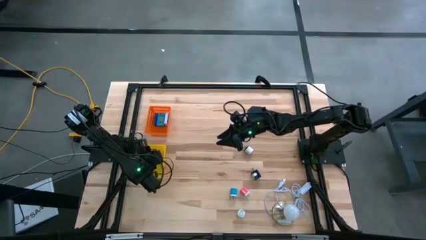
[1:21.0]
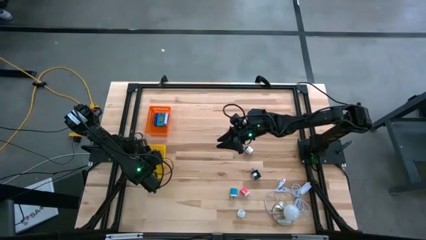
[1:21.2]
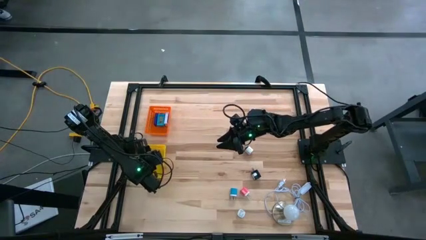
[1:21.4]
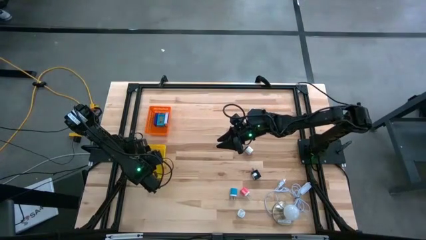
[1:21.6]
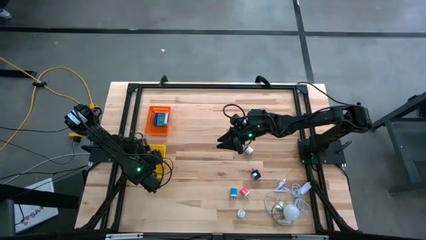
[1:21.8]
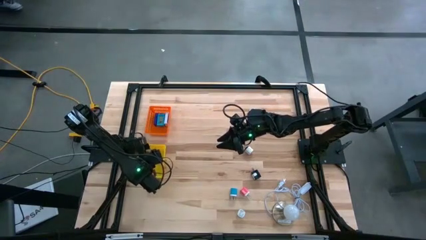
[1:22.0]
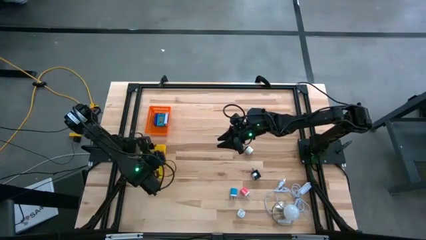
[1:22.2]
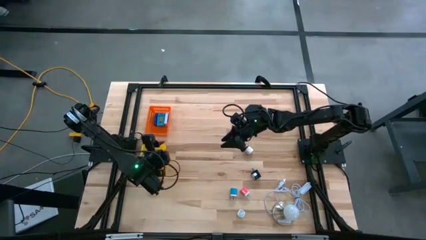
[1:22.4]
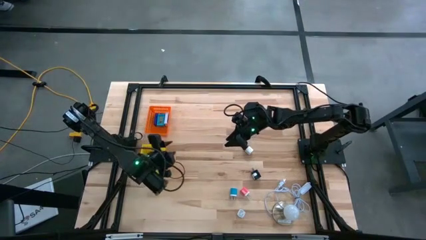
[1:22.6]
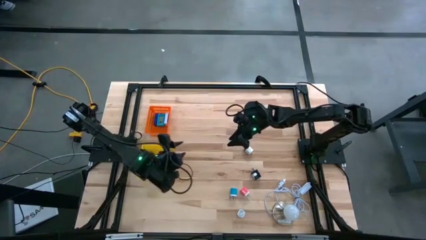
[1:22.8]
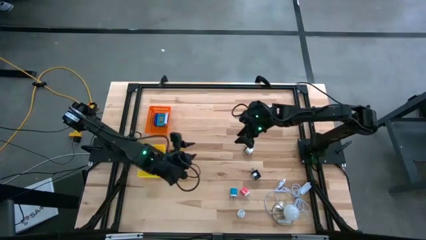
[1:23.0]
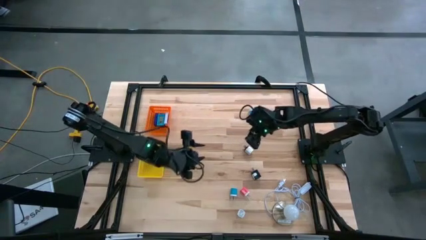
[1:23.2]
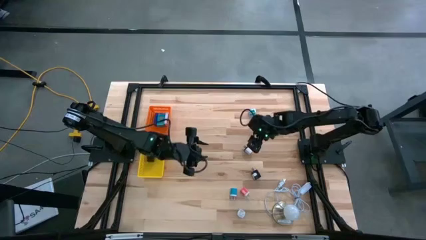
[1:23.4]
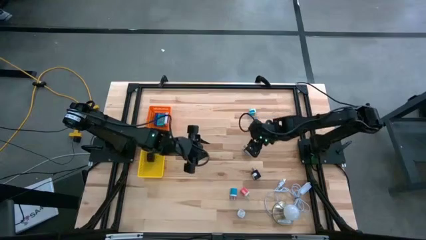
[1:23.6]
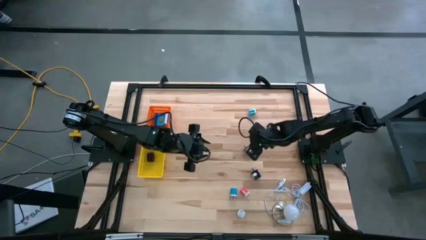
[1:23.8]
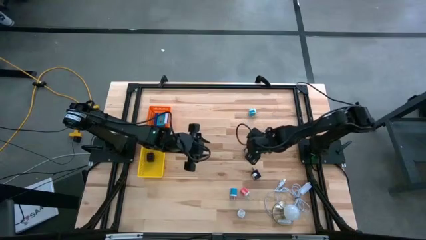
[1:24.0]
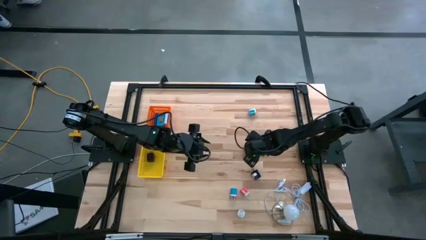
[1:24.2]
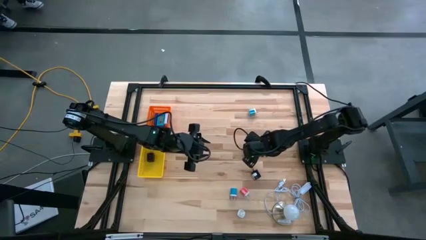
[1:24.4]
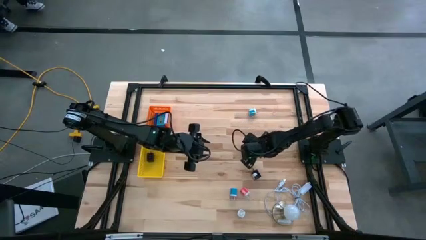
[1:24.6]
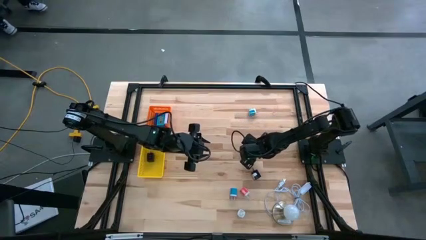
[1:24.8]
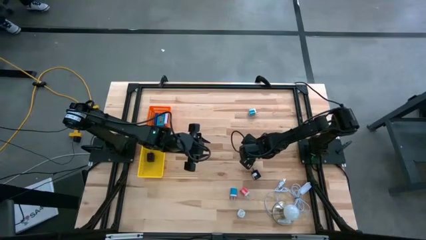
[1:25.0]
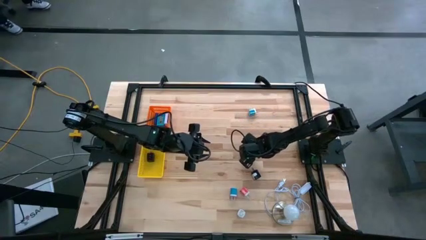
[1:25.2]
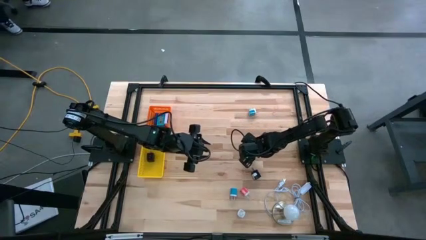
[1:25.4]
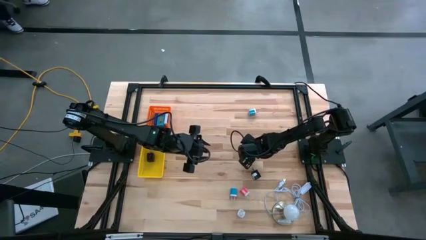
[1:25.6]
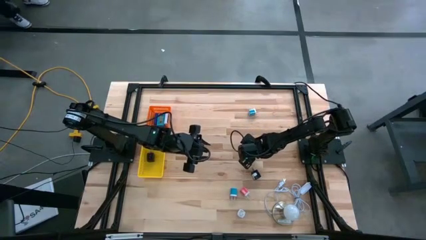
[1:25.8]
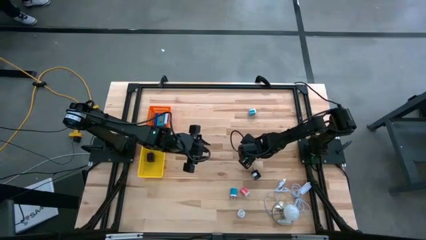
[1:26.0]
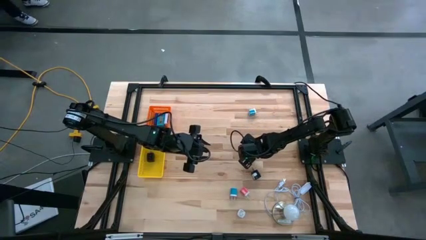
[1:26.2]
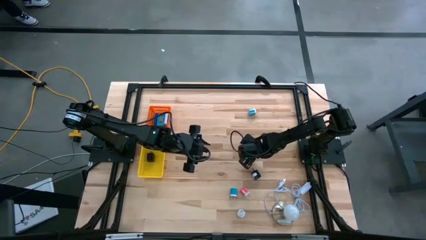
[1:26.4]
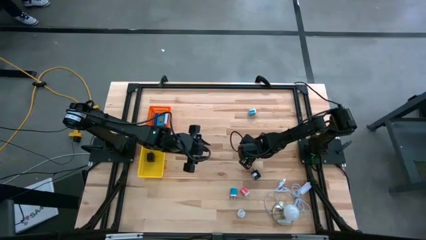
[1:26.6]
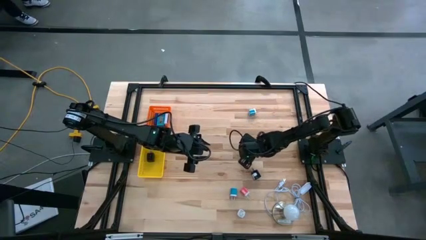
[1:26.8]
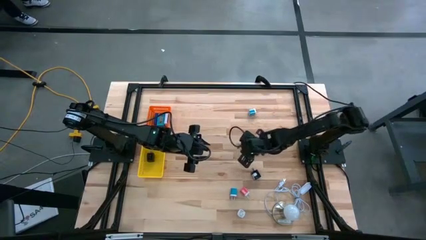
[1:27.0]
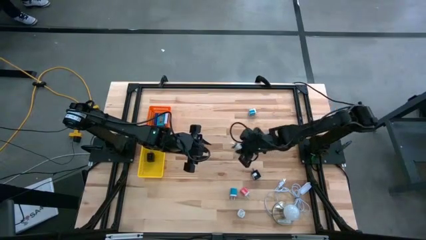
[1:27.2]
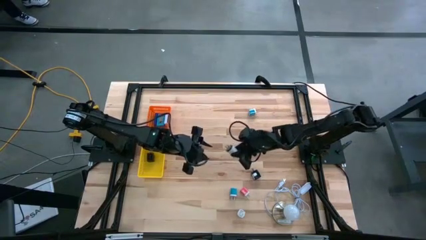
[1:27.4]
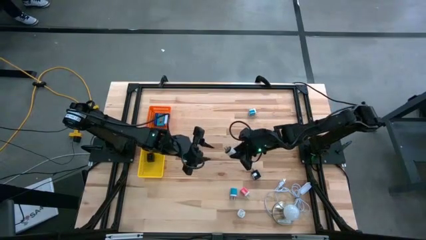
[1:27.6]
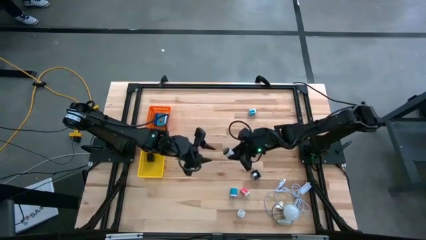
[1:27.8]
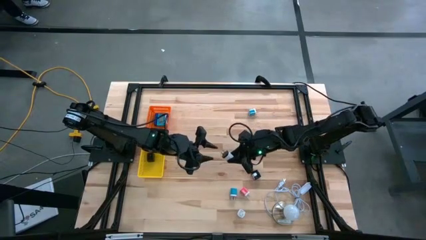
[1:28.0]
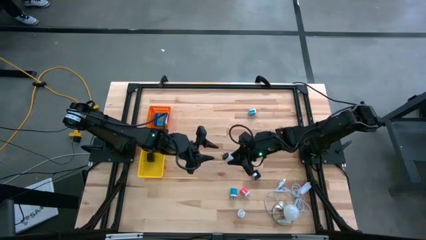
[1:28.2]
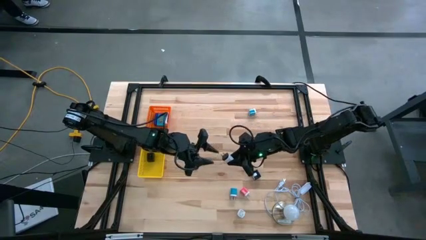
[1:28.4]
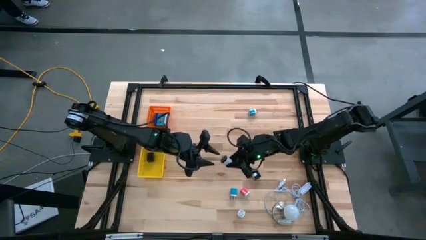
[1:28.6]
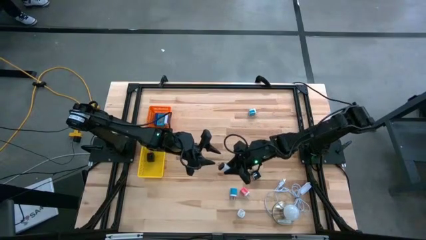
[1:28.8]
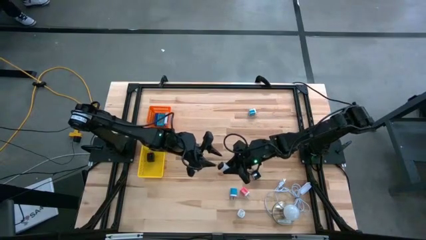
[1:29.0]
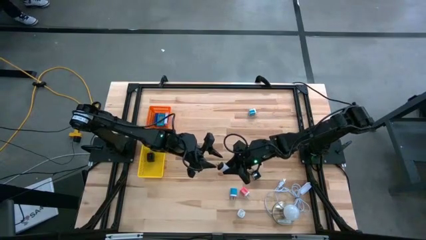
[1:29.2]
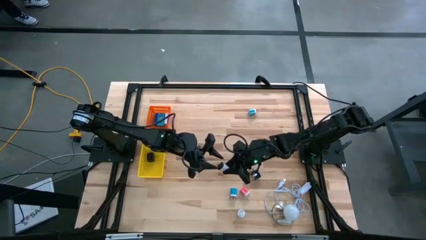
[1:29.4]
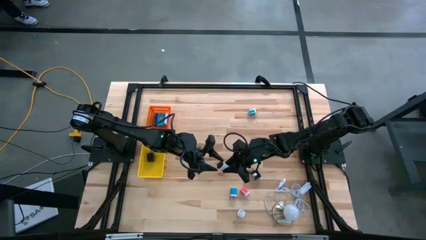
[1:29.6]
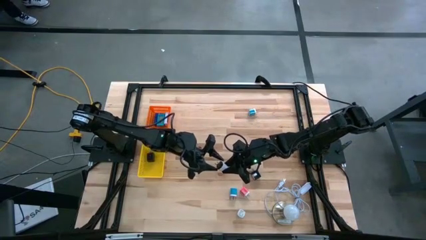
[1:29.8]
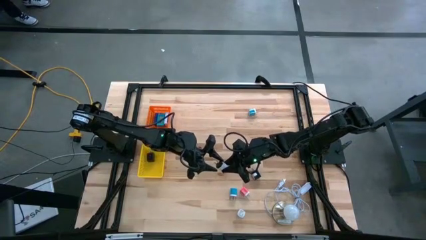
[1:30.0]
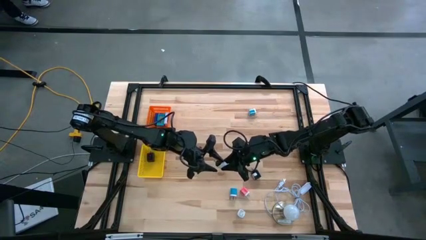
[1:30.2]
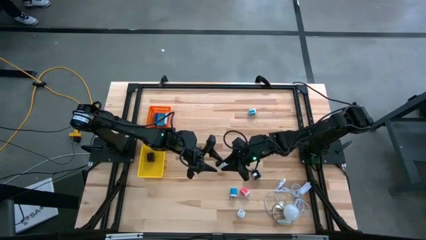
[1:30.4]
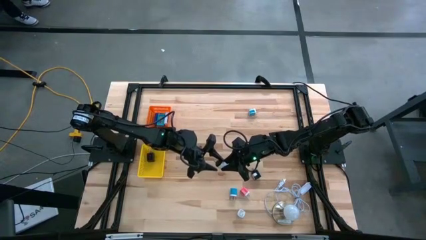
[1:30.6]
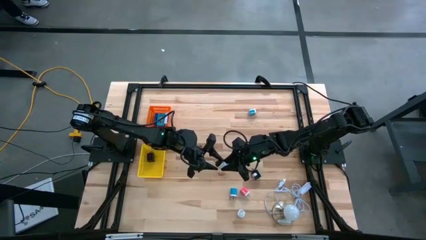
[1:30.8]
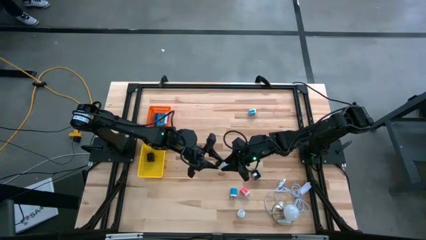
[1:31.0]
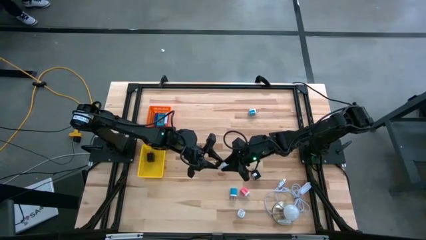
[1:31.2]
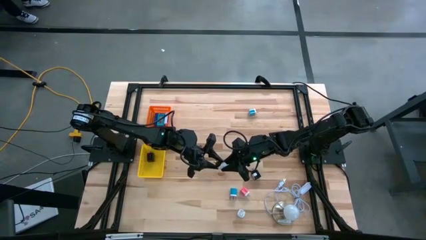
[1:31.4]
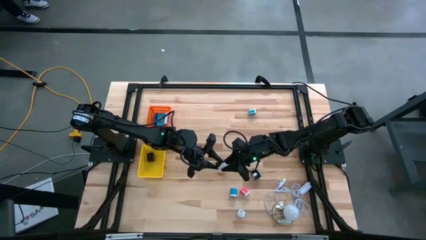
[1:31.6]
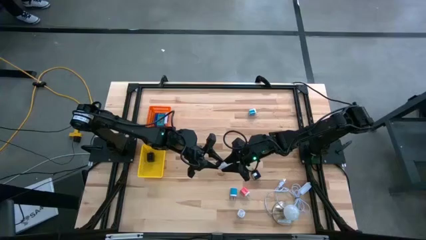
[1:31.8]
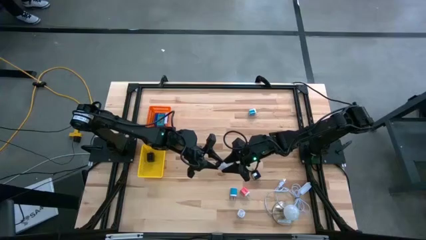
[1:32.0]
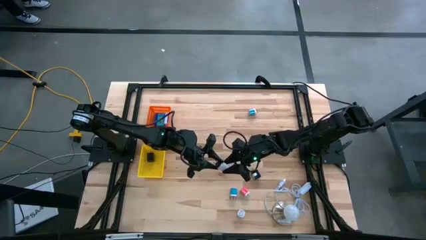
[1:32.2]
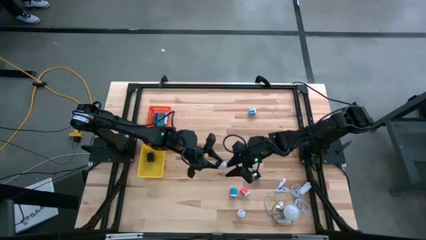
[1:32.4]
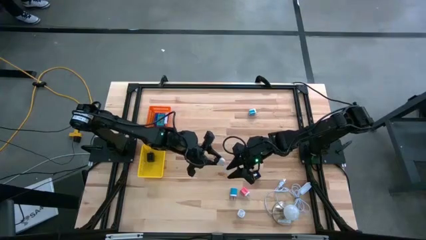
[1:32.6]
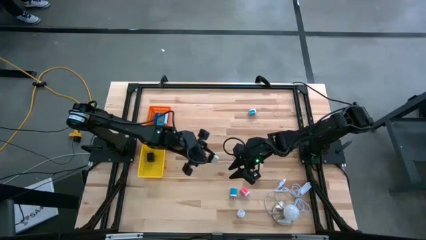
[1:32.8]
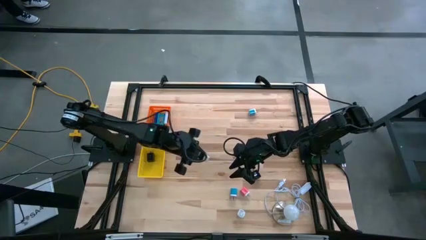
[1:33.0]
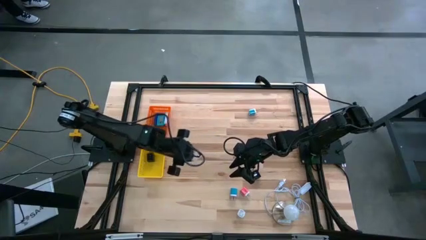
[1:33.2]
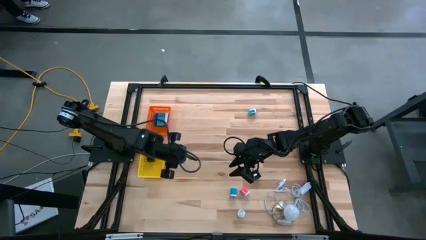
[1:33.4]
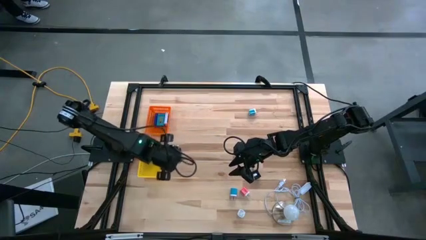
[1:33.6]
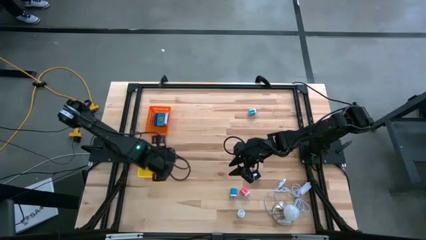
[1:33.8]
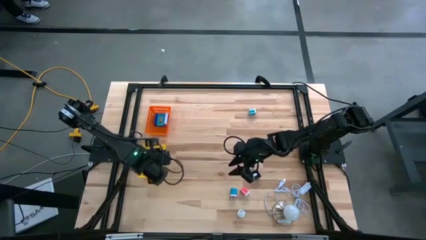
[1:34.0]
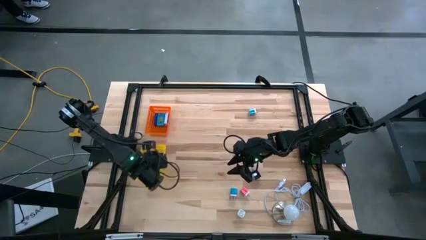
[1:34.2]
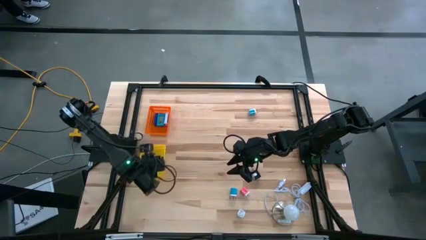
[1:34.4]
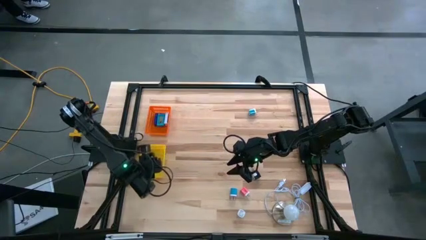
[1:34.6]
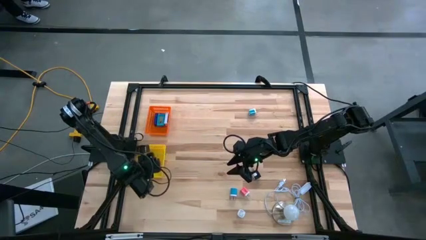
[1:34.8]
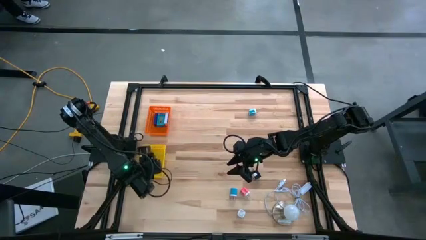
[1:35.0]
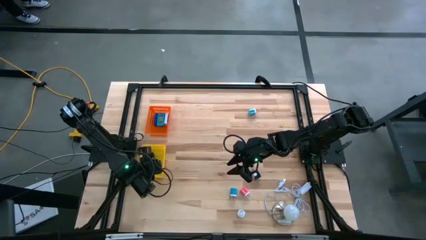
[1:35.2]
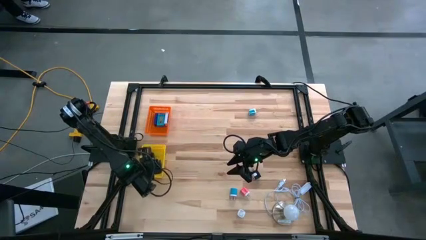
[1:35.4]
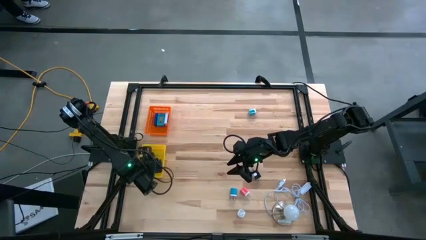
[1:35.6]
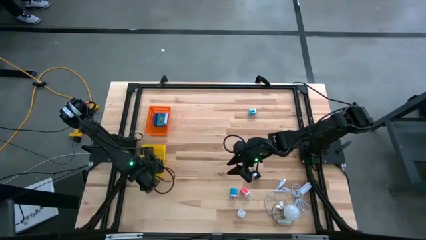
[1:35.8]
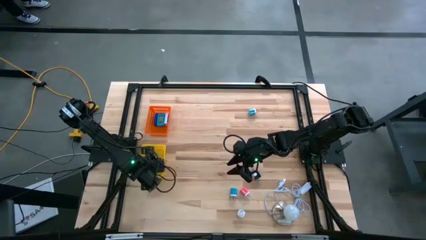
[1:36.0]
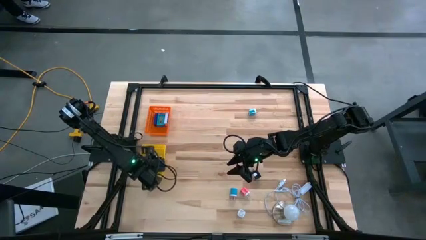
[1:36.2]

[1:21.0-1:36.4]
Task: Pick & Place Office items
Put the white charger adapter into the yellow basket

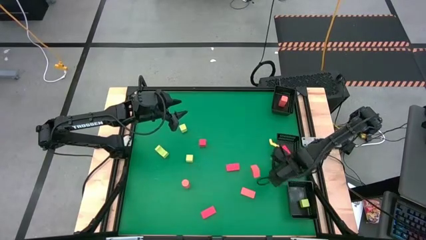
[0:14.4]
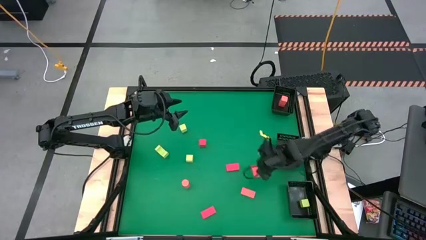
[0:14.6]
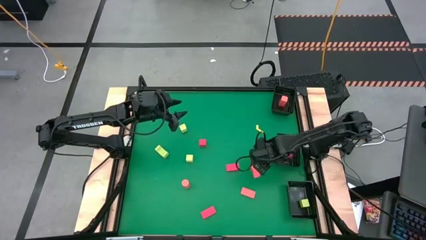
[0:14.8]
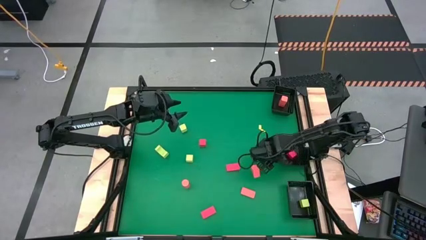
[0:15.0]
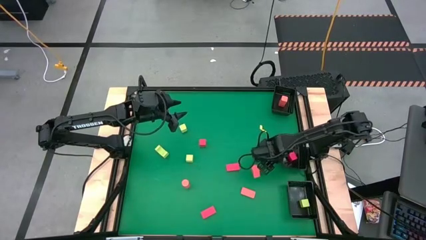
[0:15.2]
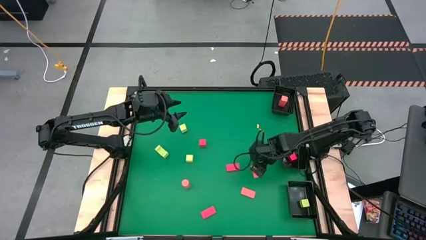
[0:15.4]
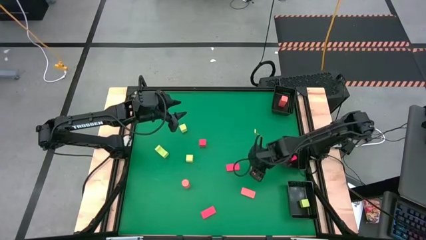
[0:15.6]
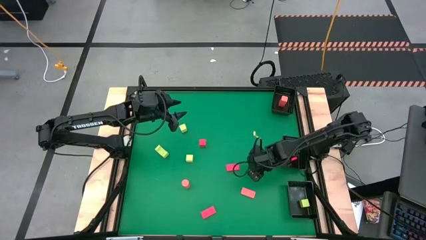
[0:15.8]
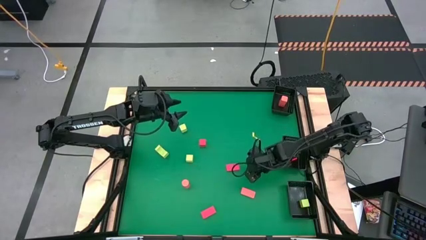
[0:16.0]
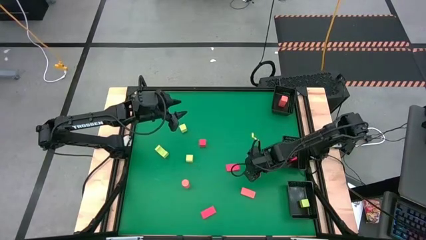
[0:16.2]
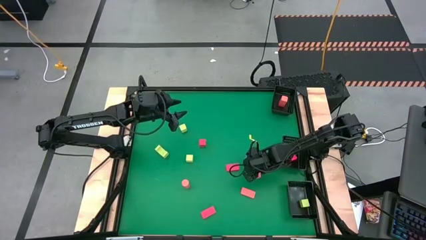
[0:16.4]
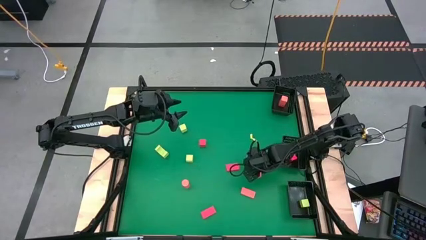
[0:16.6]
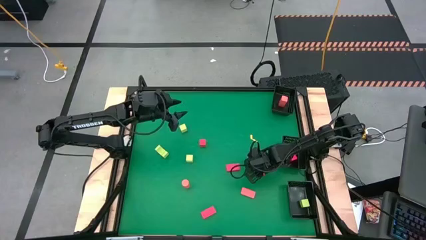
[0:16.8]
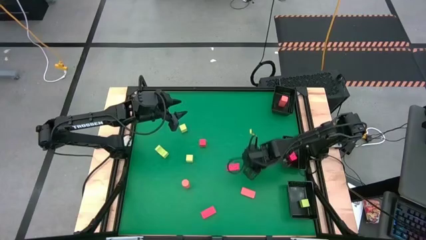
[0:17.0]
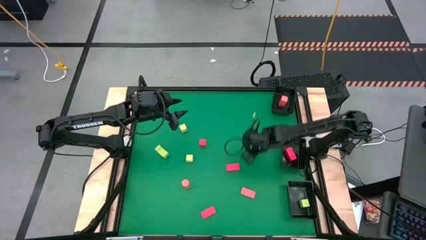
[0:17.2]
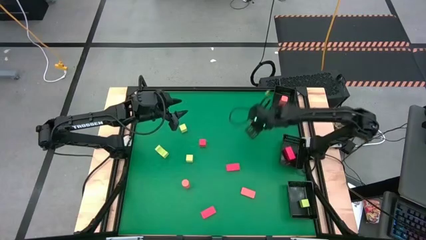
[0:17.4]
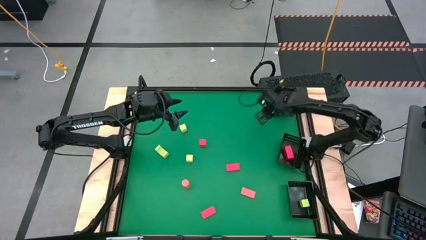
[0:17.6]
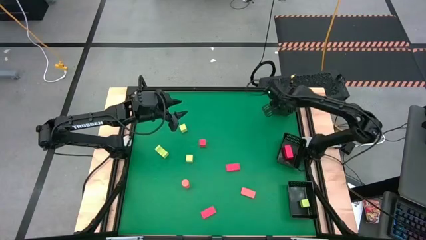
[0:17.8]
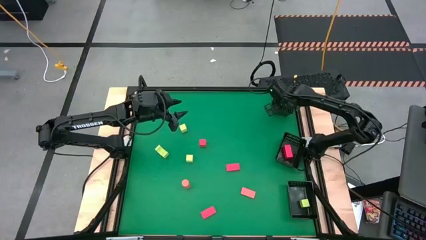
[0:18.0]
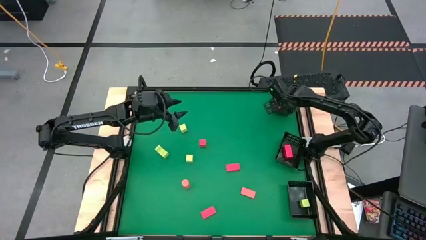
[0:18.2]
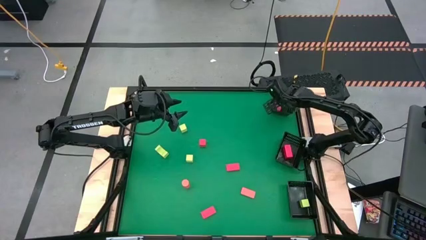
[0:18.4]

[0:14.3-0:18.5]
Task: Sort & place blocks by color
Put the top right orange block into the top right black bin
